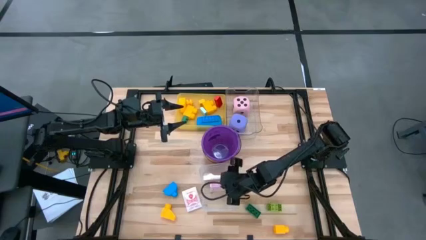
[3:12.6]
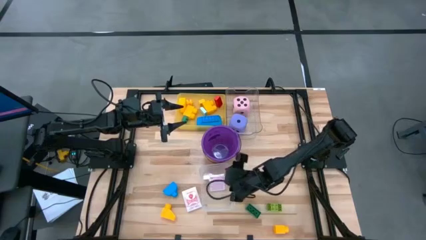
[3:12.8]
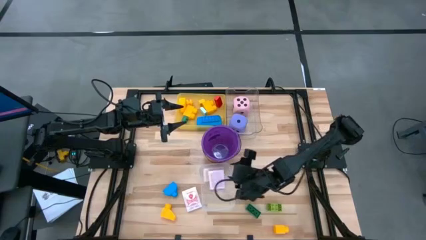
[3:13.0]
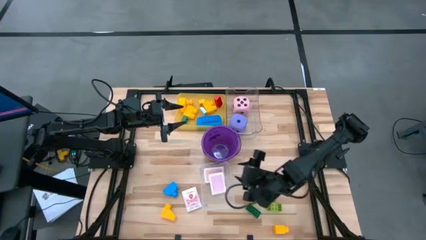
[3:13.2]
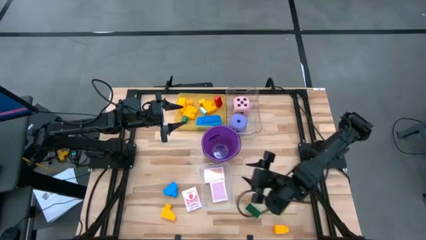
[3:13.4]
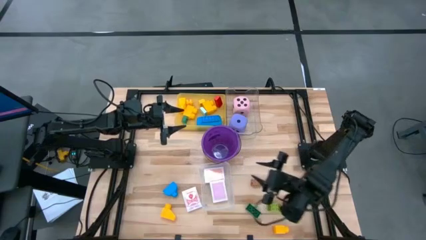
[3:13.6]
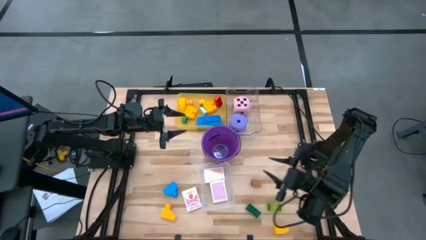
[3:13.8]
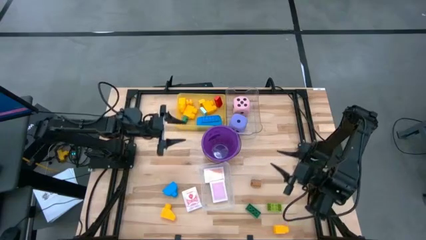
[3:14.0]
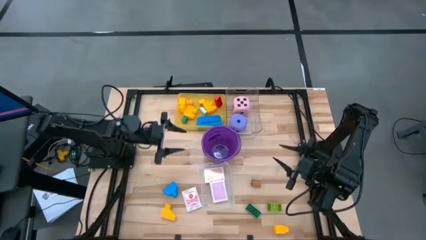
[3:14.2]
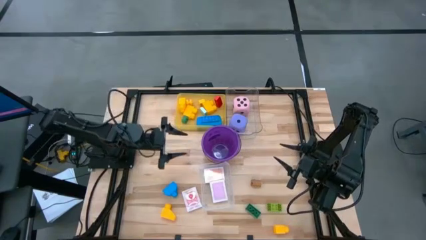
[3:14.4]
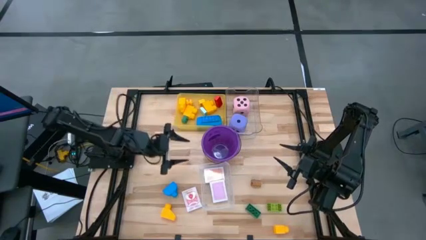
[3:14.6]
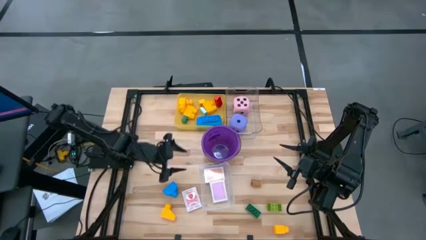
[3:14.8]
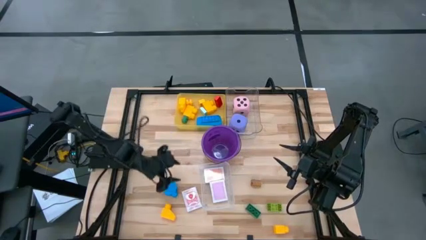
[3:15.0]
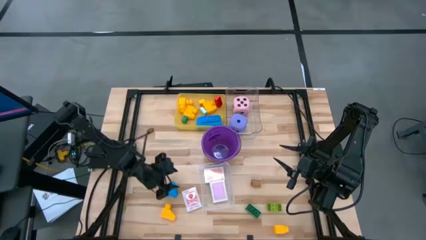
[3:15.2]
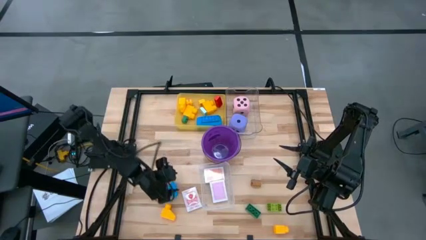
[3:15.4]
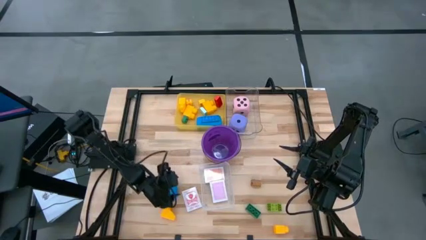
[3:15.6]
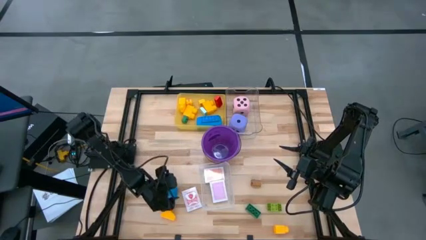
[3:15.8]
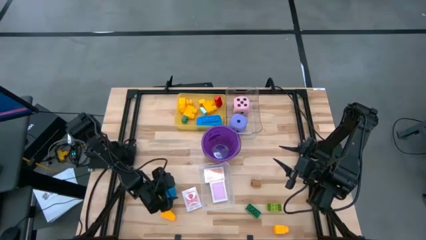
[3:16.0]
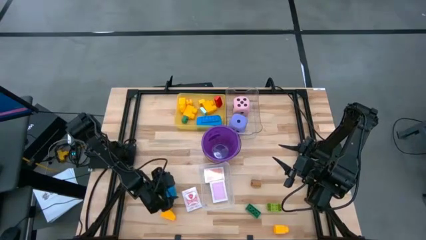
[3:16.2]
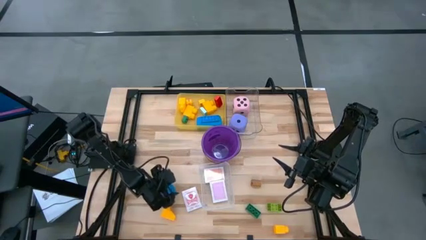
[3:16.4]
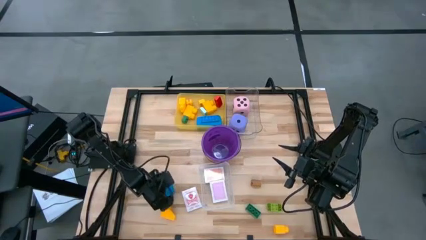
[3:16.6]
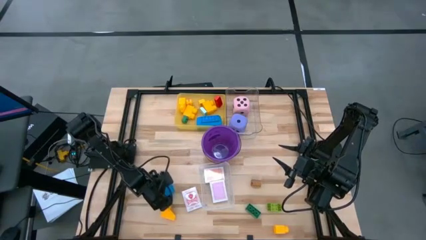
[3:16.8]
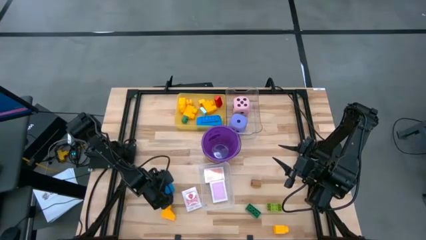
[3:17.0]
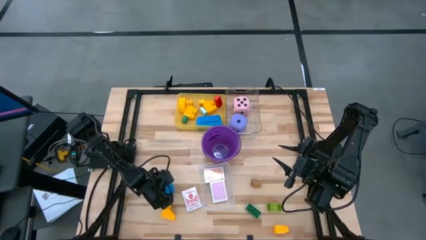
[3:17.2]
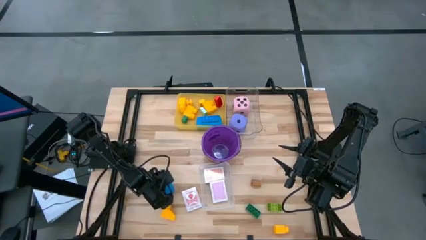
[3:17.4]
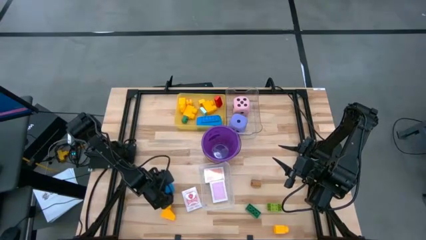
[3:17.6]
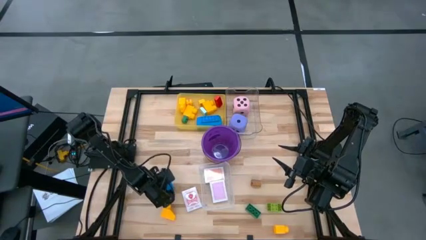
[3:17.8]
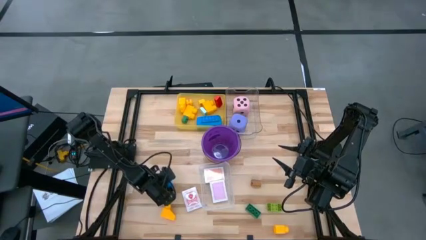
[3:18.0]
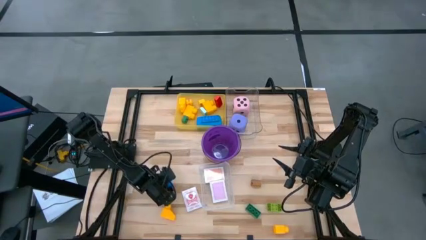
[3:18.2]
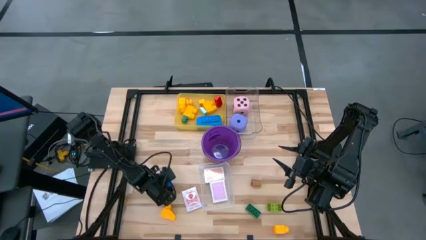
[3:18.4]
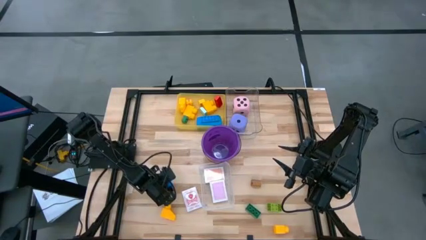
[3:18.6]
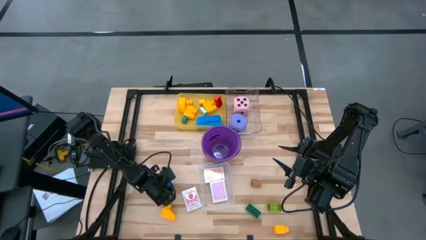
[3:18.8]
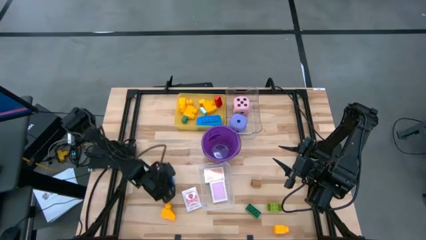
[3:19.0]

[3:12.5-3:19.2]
Task: Pick & Place Toys
Put the blue game piece into the yellow bin

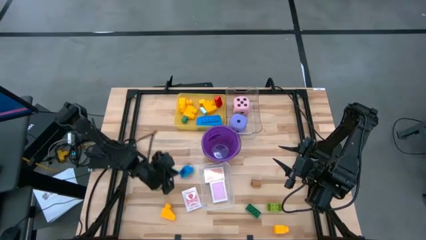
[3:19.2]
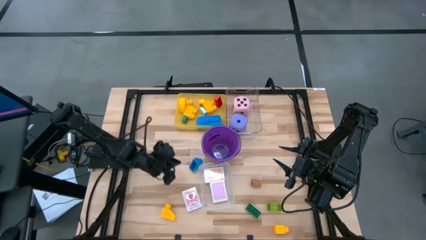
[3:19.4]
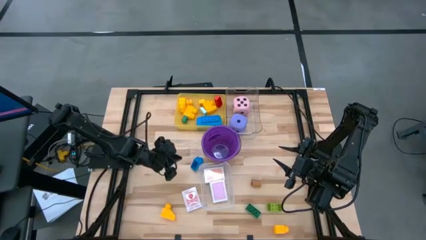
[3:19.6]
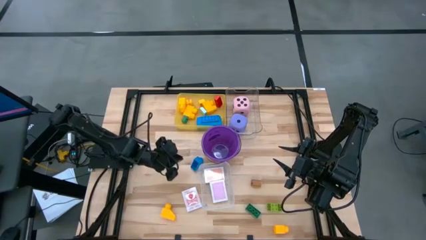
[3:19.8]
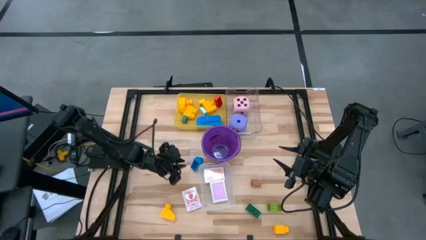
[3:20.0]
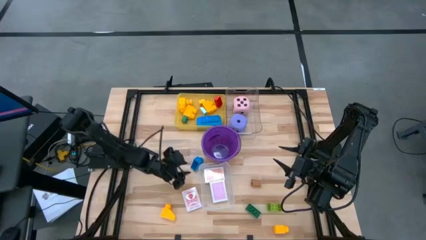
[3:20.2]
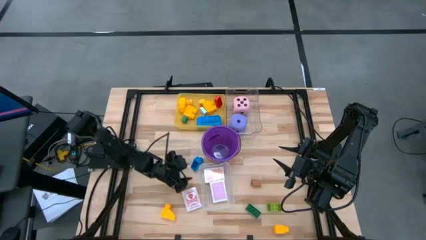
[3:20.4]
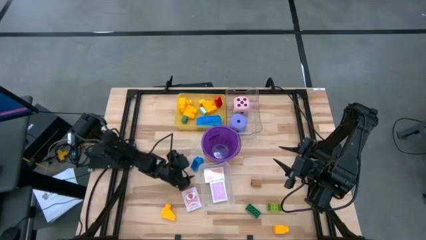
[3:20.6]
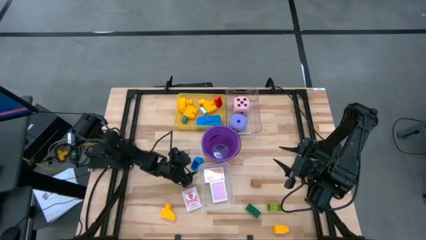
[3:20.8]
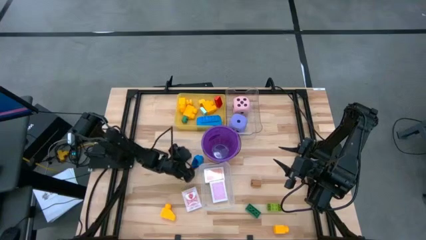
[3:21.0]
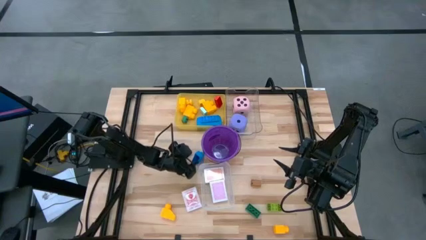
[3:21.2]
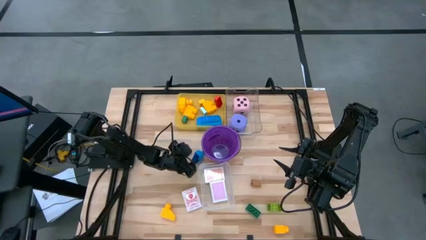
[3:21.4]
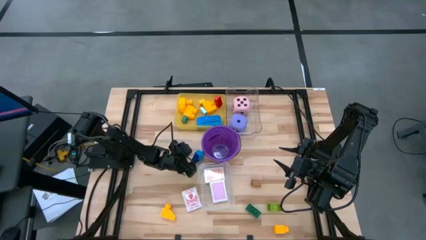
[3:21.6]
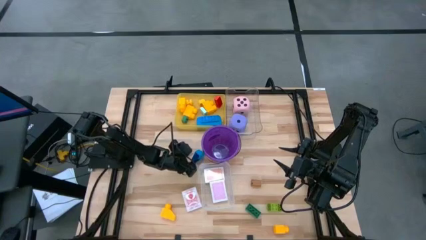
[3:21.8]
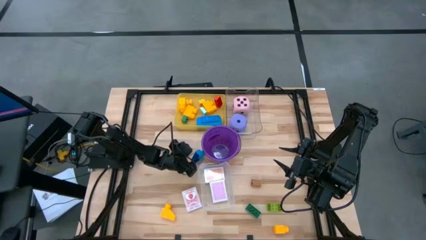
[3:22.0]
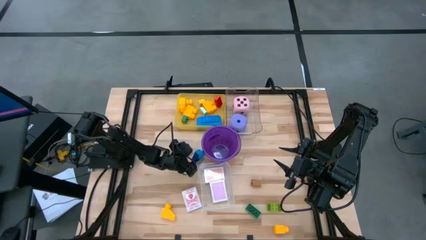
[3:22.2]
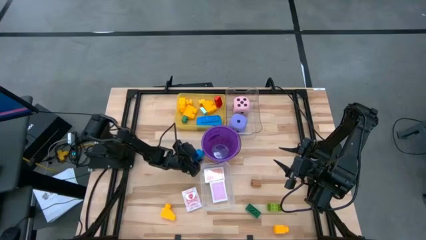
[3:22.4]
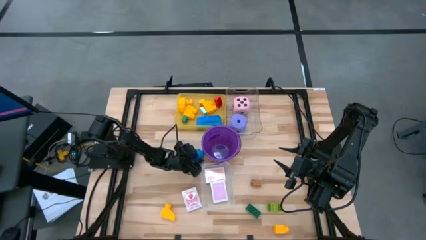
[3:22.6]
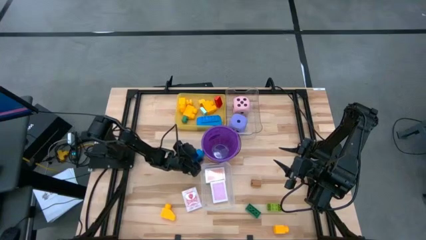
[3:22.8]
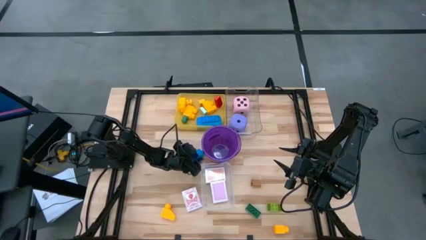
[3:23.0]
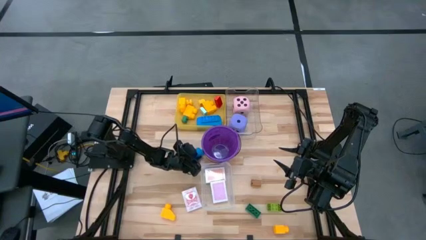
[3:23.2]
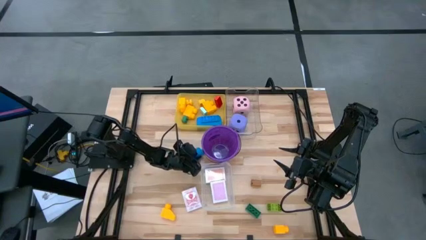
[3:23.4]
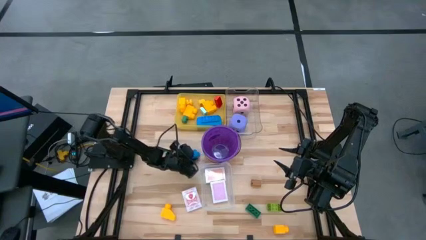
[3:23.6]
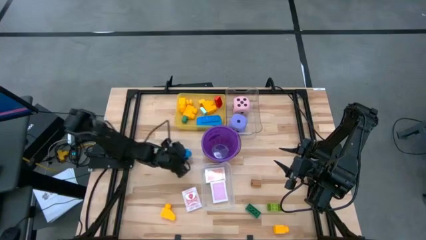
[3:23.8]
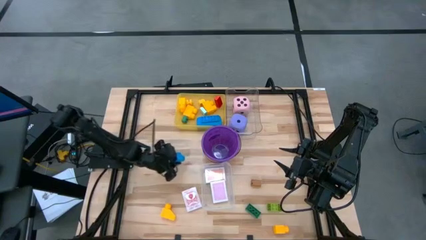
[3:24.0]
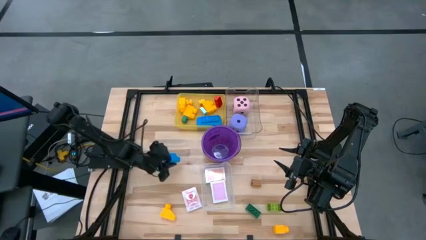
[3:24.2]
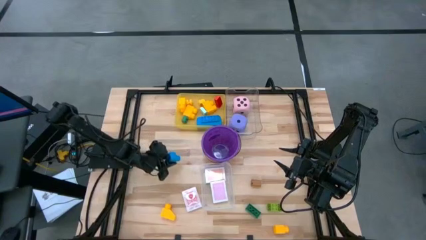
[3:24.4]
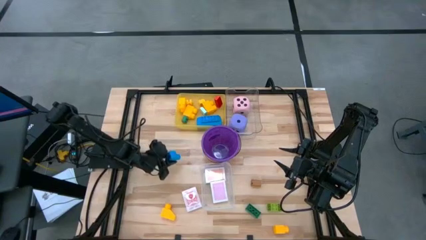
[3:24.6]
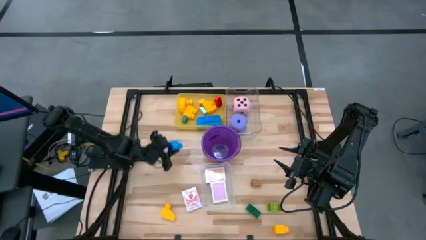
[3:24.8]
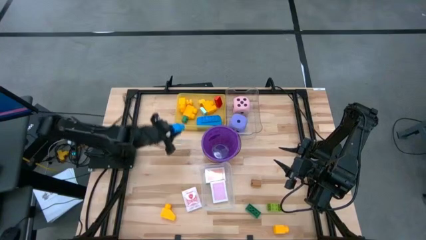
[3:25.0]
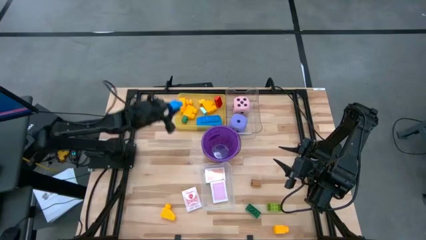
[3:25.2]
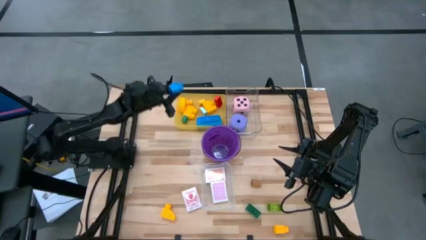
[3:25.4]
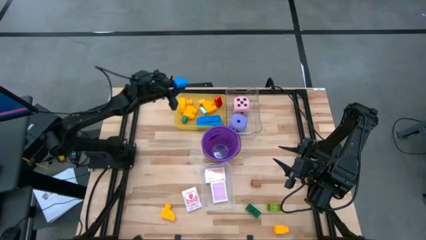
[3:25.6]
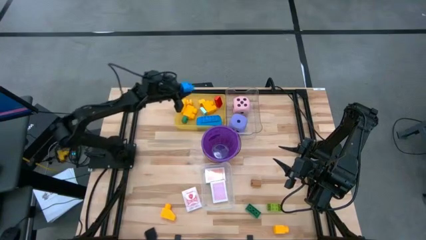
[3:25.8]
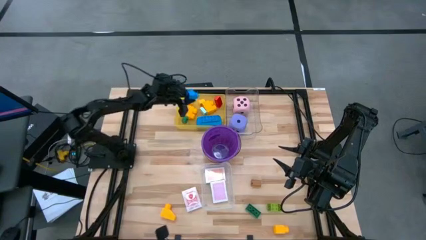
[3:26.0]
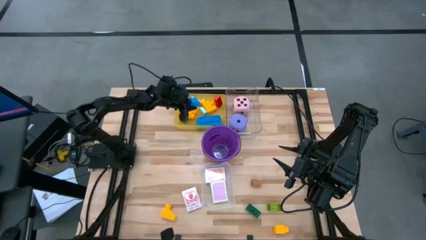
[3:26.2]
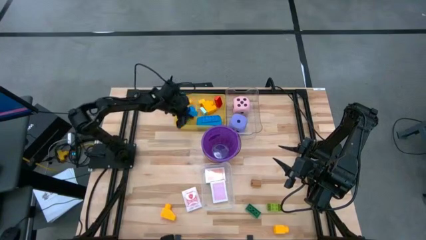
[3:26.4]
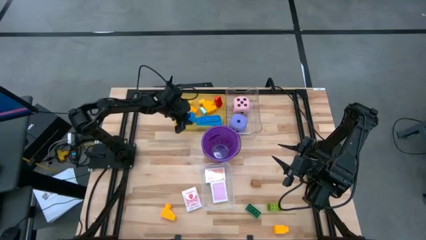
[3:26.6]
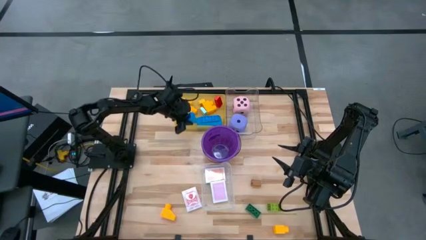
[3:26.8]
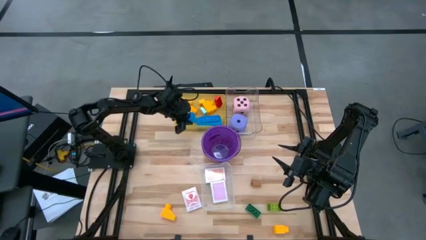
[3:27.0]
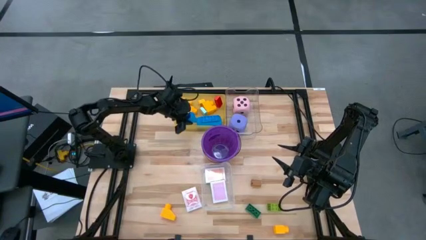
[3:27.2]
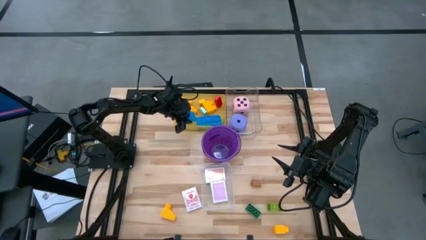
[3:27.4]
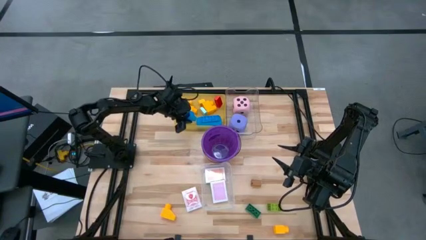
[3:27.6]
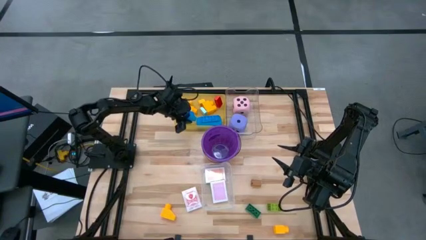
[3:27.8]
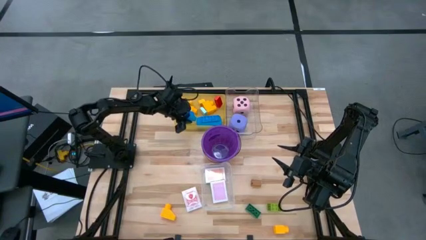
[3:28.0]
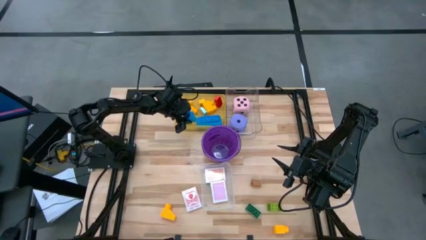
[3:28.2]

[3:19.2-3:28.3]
Put the blue game piece into the yellow bin

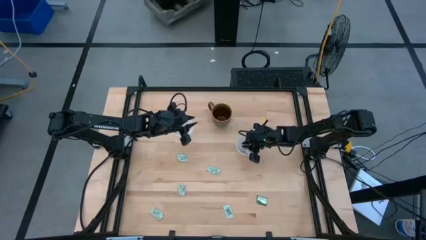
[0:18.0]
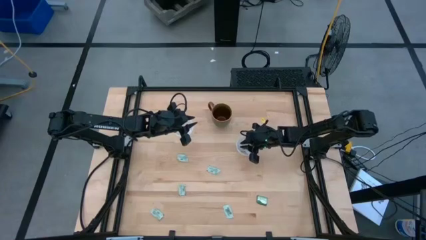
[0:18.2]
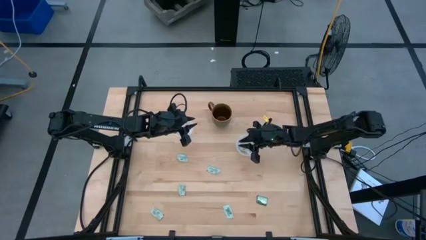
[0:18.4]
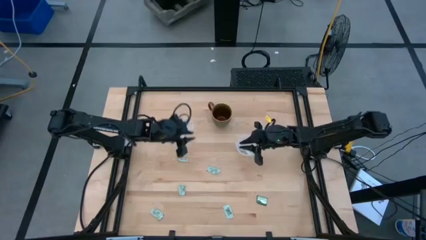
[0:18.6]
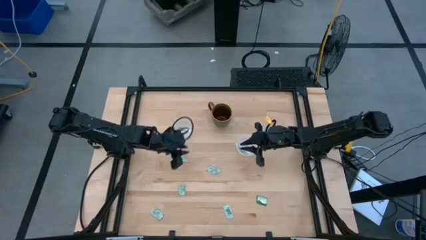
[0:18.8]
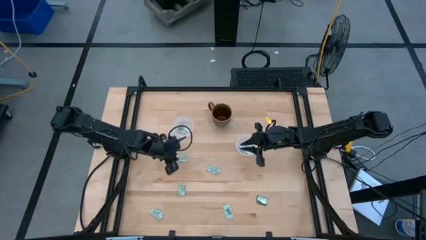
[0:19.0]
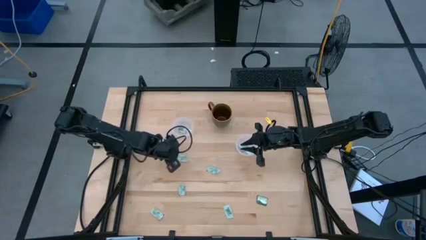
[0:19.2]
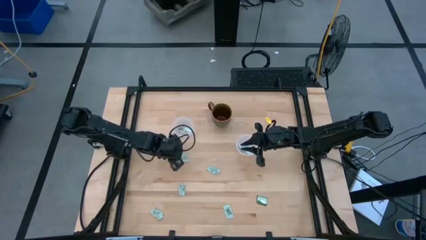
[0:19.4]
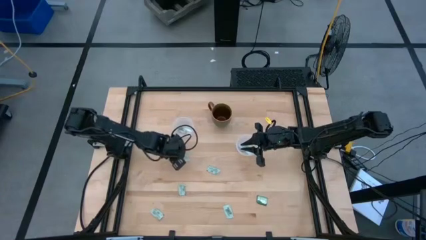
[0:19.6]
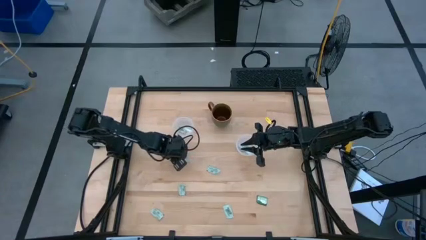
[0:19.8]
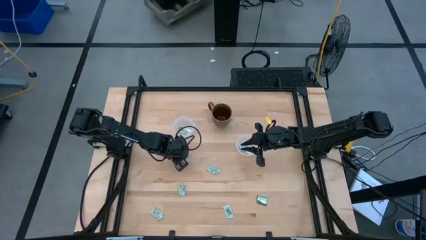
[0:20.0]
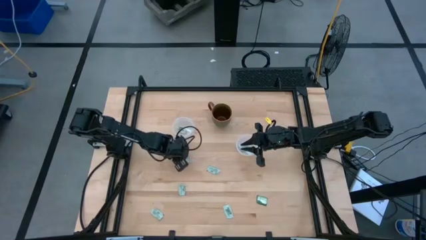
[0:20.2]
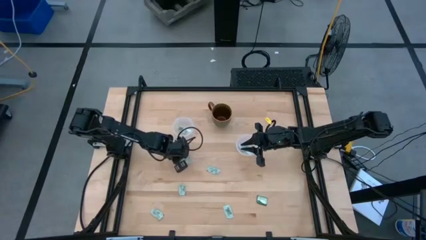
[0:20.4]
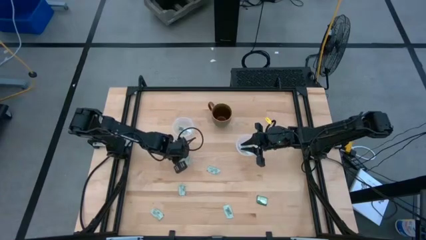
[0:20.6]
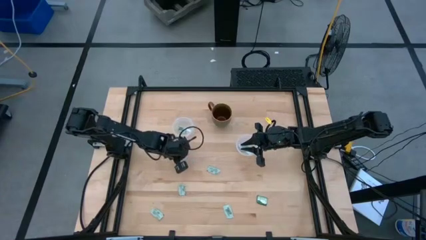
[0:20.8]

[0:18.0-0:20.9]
Task: Pick and place Stevia / Truvia into bins
Put the white stevia packet into the left round transparent container
